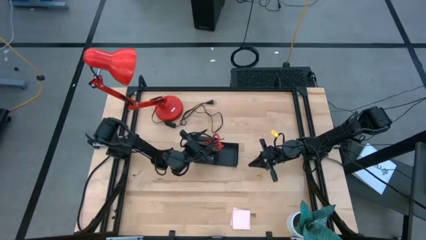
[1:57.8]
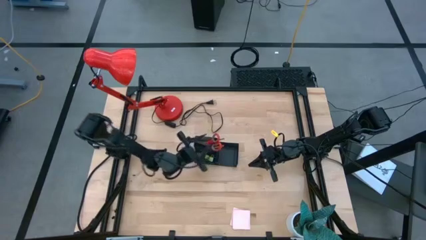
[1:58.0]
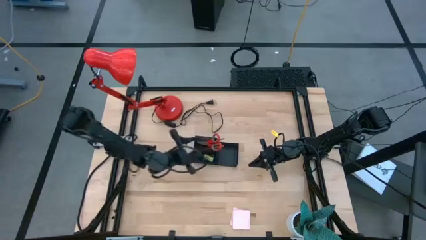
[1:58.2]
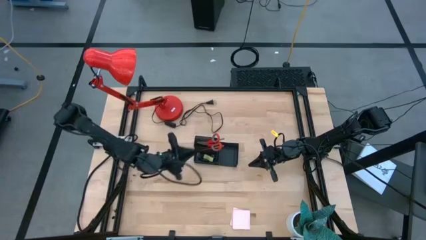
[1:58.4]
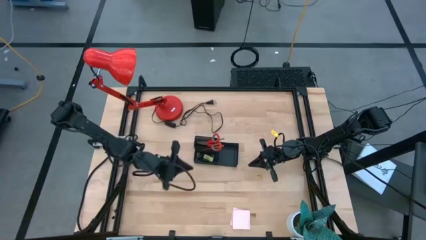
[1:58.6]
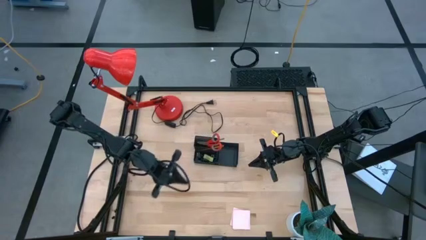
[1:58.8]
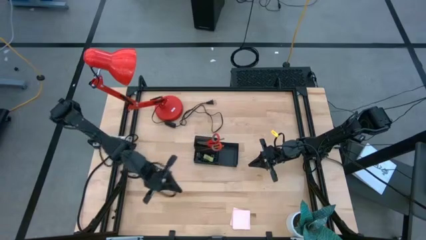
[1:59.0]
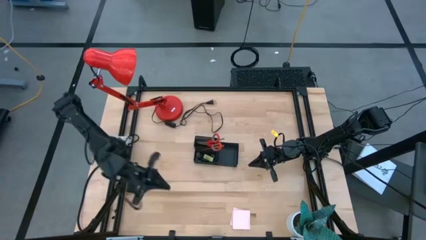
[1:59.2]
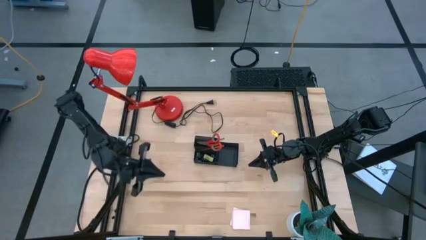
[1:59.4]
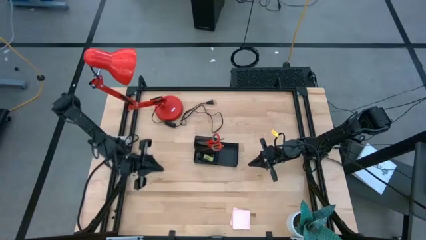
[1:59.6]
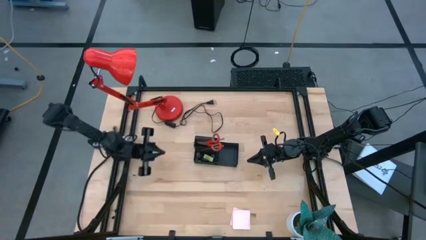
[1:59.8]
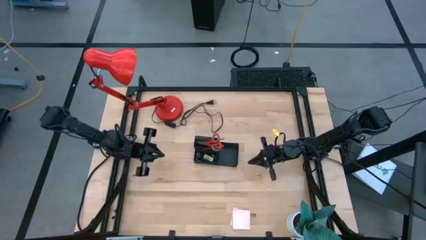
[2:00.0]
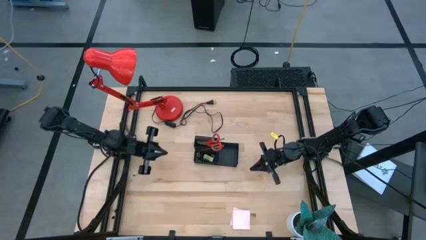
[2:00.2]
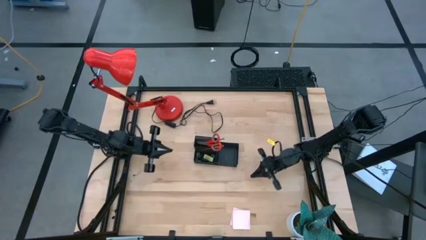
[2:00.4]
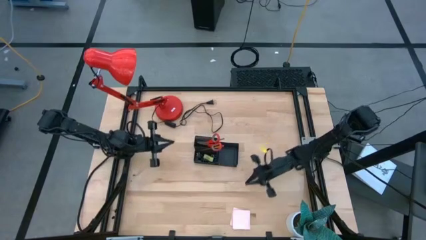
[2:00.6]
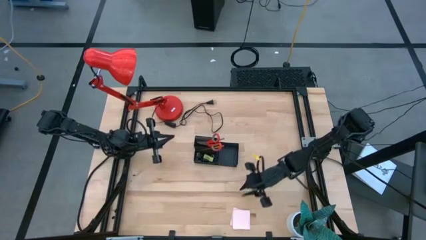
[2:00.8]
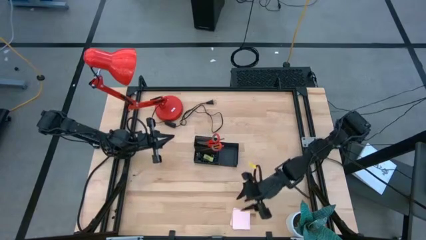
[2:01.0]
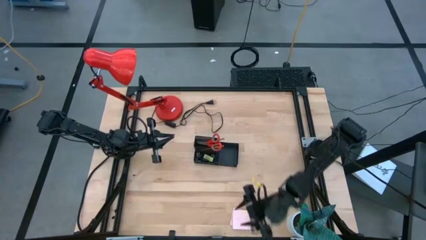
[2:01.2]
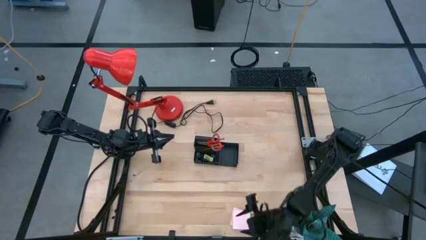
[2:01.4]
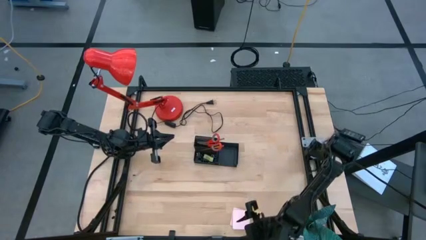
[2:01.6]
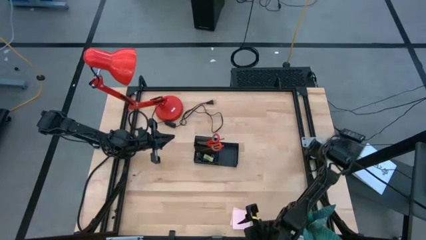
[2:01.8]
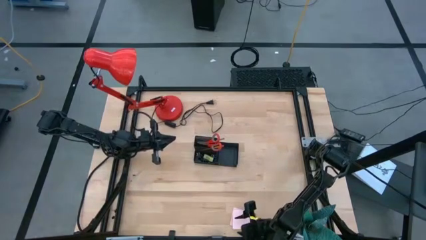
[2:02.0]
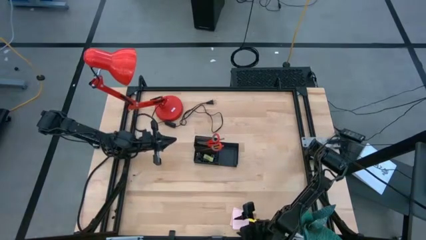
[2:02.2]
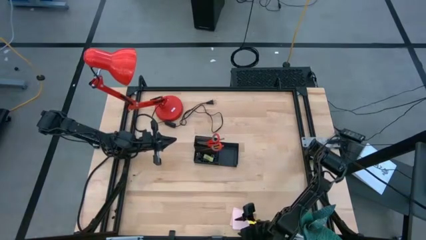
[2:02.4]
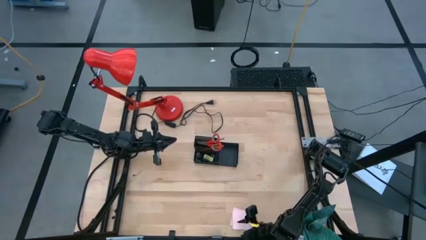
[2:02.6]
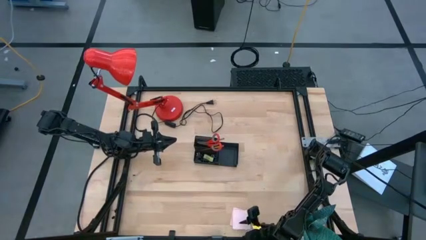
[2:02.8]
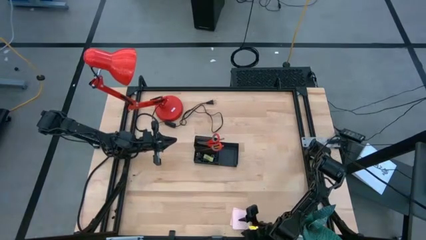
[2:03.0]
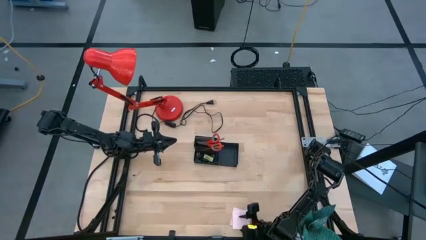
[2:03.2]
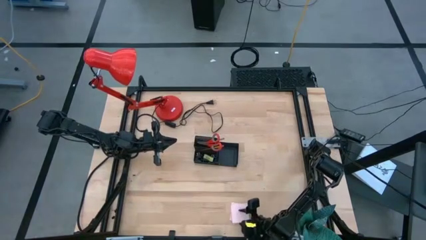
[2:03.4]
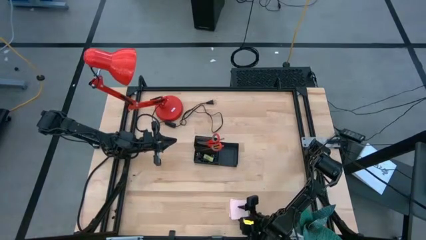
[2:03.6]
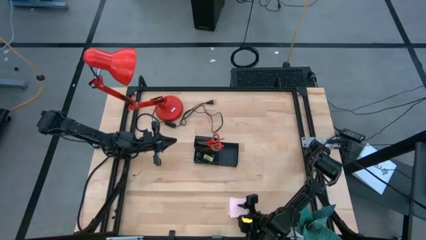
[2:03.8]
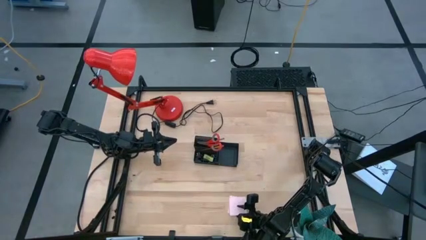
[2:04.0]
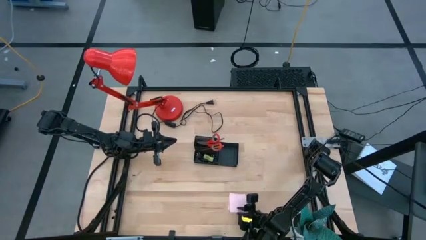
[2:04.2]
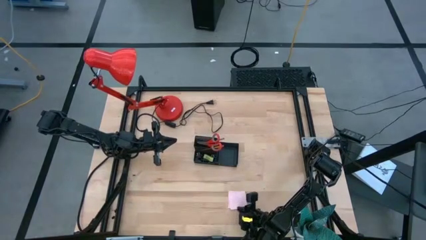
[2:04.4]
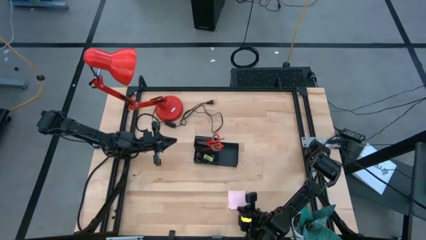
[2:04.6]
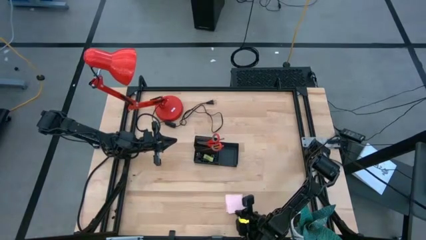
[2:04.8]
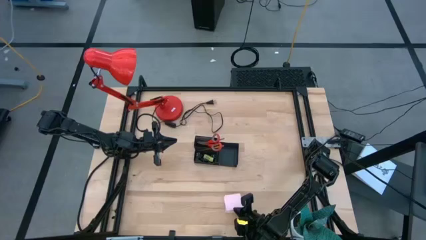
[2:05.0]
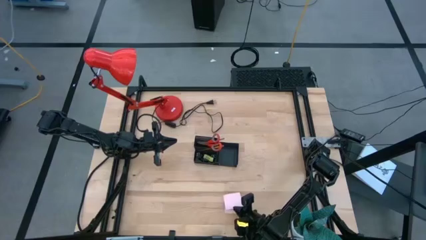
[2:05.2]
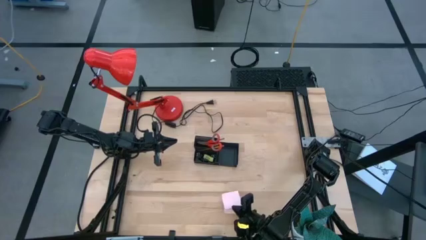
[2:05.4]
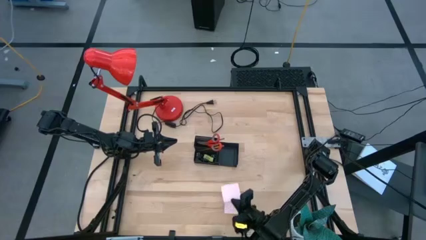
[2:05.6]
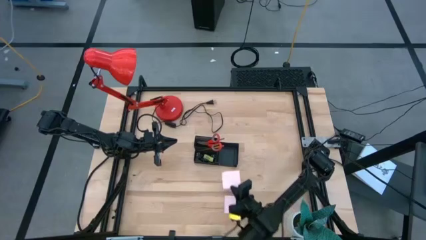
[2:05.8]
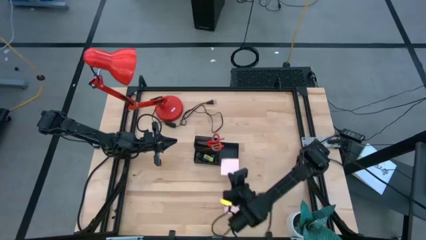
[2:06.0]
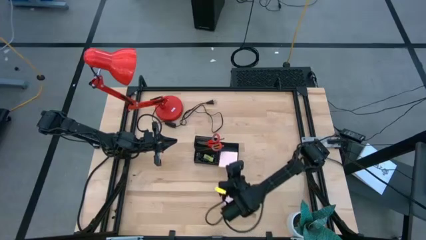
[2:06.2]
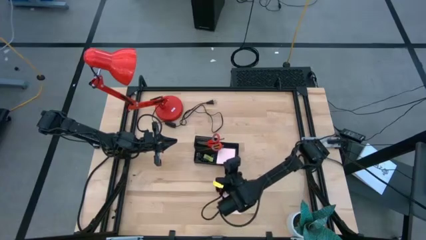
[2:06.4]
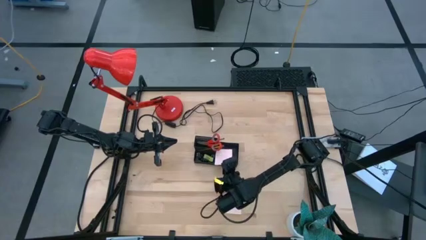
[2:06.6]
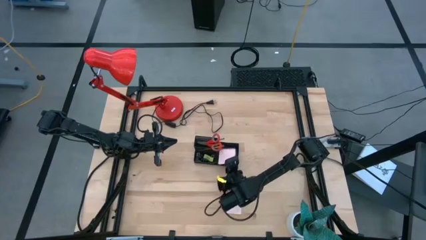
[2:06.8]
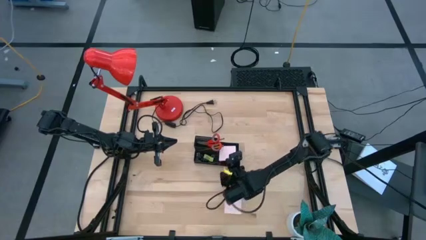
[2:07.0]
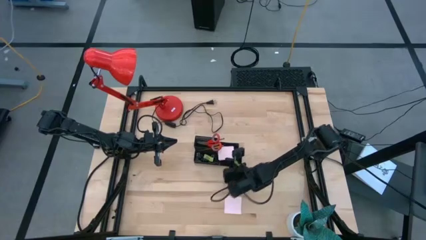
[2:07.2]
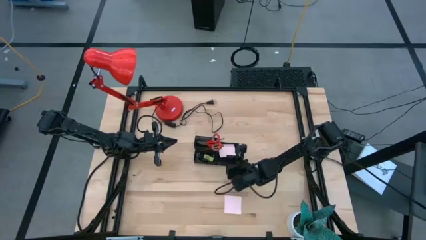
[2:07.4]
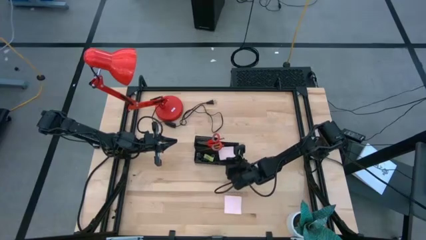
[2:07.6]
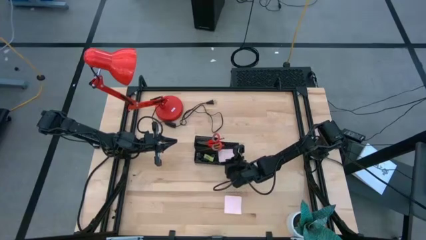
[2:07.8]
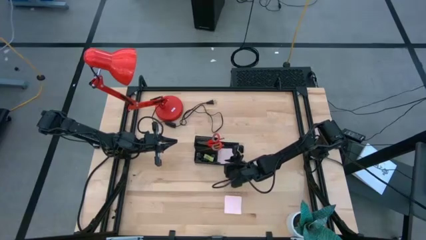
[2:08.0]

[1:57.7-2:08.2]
Task: Pick and place office supplies into organizer
Put the pink sticky notes into the desk organizer

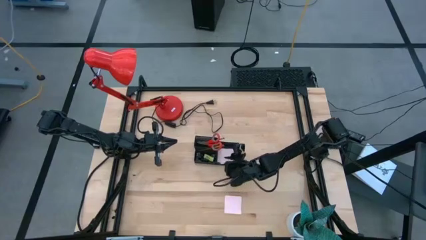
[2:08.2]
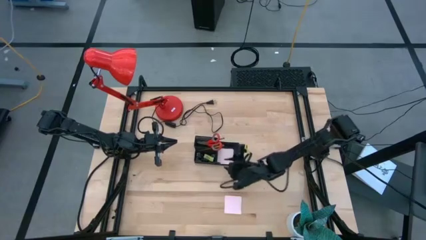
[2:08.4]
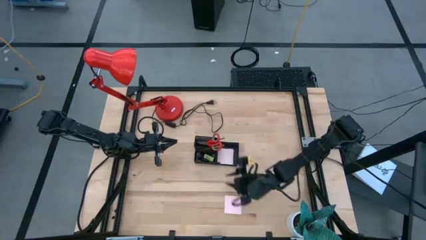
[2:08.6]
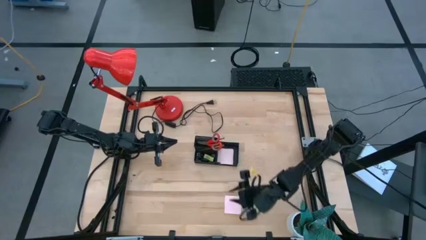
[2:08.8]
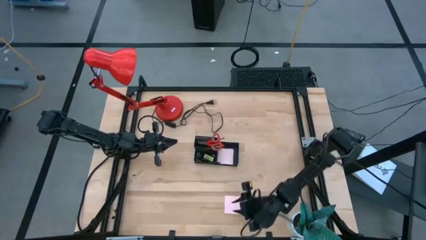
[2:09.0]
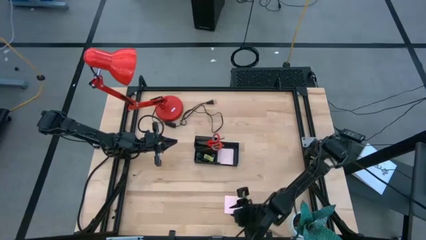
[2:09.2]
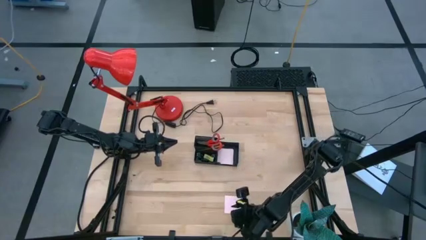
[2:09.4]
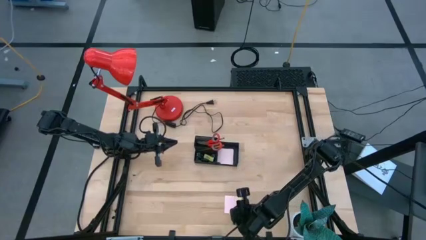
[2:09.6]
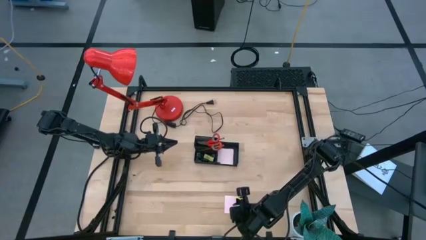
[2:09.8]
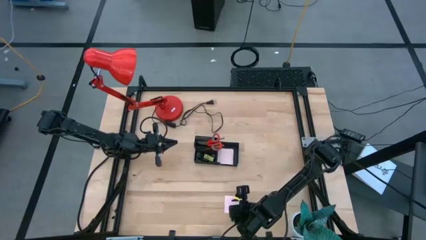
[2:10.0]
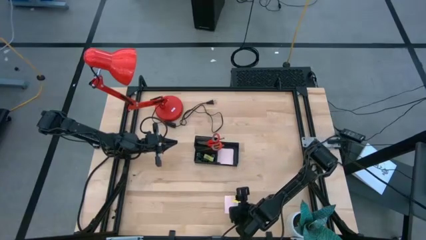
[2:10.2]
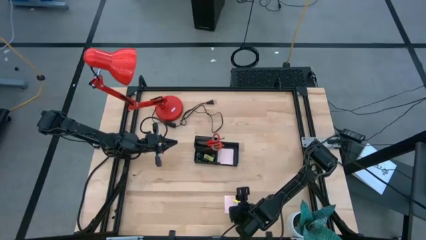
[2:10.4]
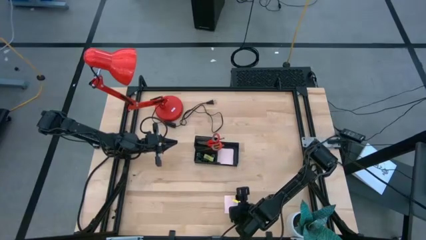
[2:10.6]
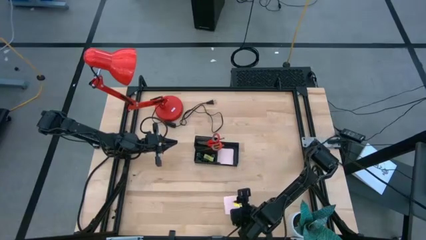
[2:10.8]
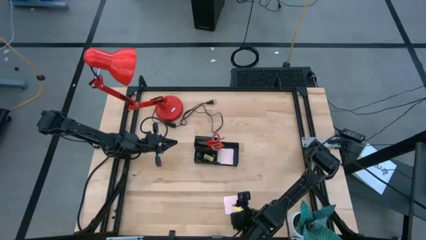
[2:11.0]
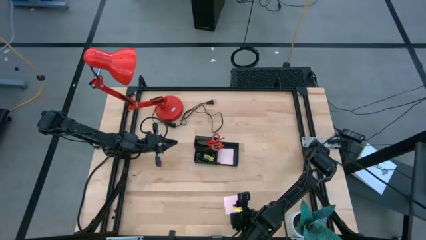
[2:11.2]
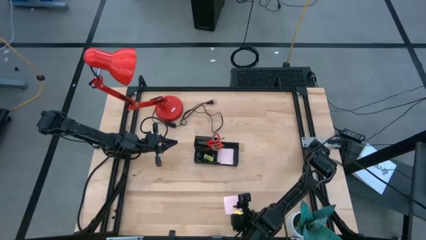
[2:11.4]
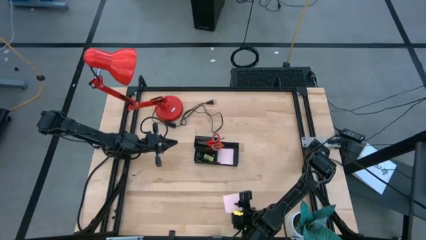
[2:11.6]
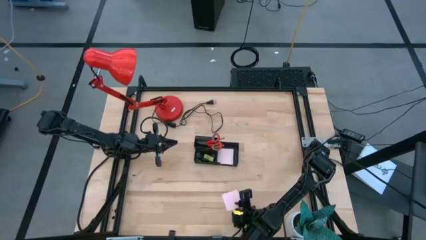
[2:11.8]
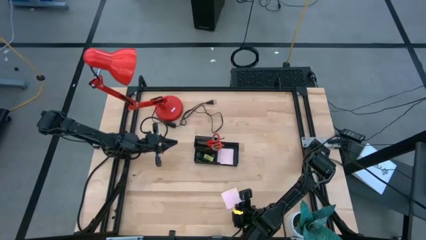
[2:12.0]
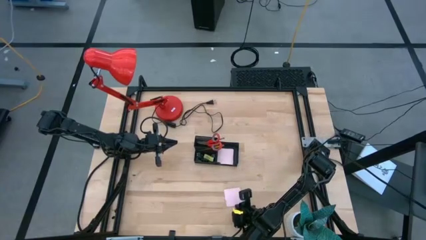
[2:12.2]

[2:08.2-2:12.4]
Put the pink sticky notes into the desk organizer
